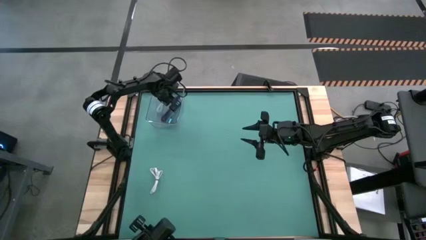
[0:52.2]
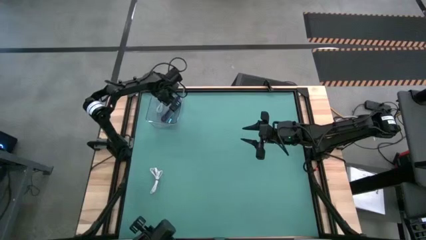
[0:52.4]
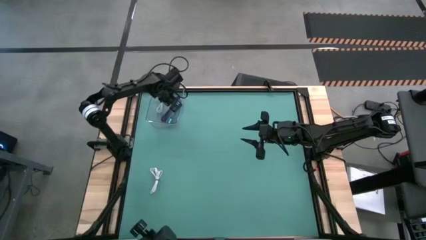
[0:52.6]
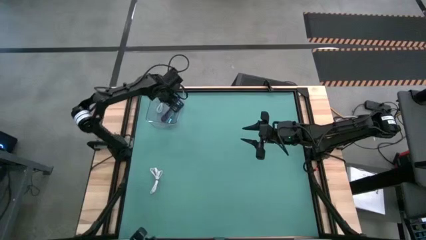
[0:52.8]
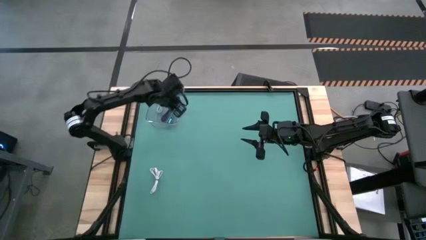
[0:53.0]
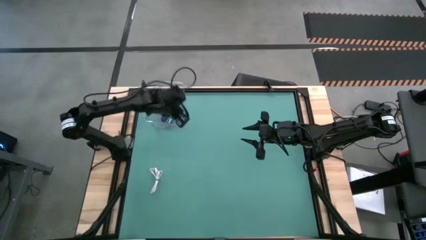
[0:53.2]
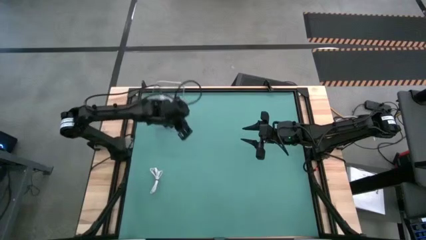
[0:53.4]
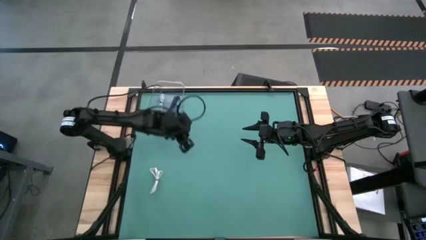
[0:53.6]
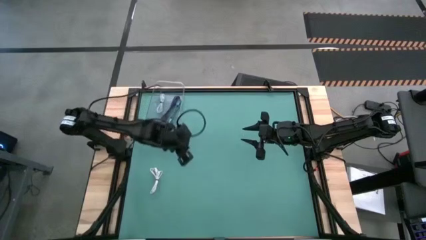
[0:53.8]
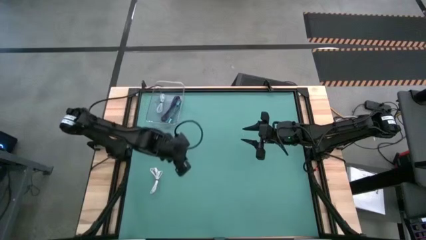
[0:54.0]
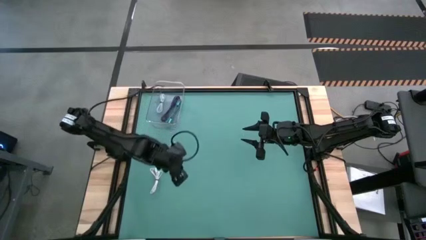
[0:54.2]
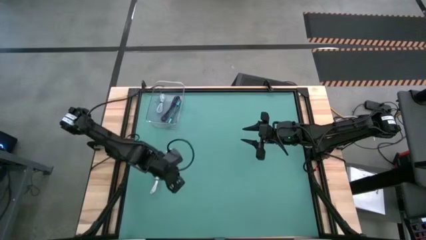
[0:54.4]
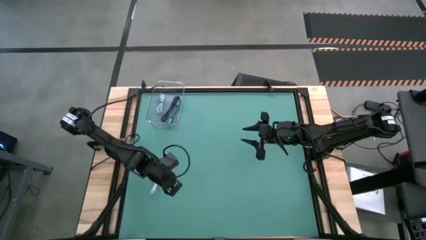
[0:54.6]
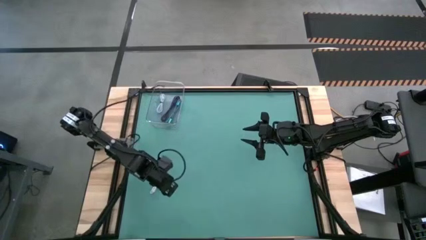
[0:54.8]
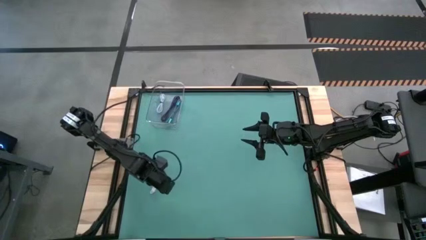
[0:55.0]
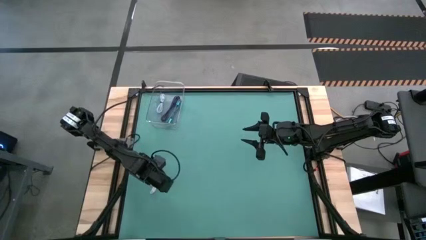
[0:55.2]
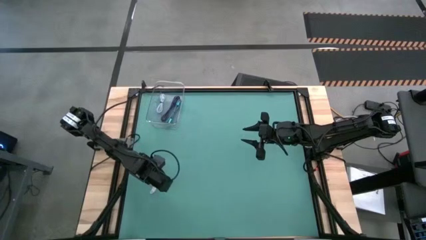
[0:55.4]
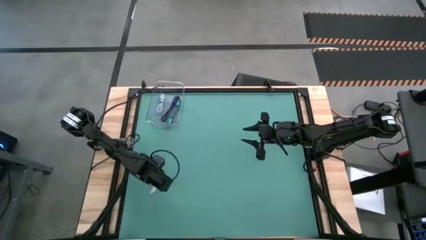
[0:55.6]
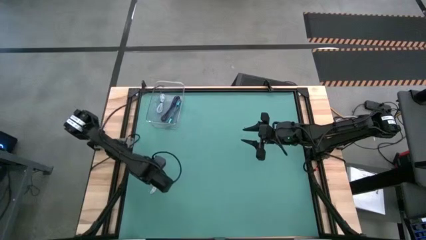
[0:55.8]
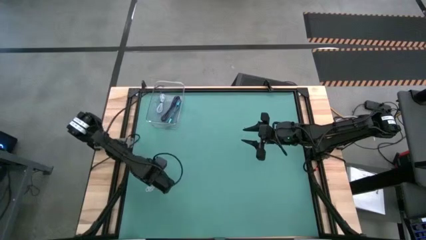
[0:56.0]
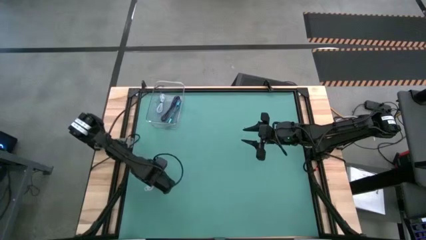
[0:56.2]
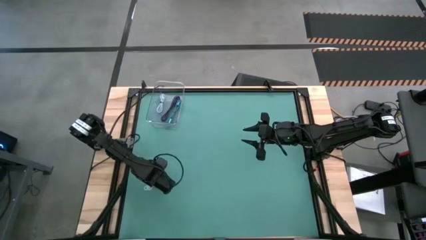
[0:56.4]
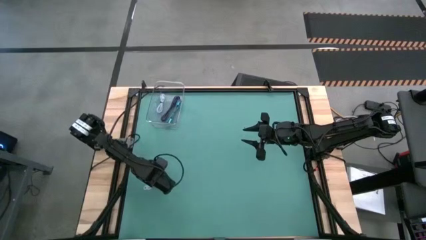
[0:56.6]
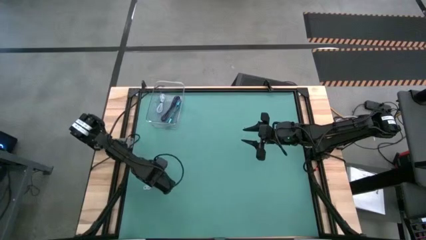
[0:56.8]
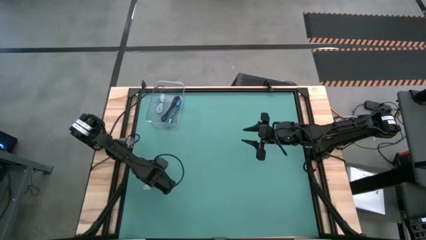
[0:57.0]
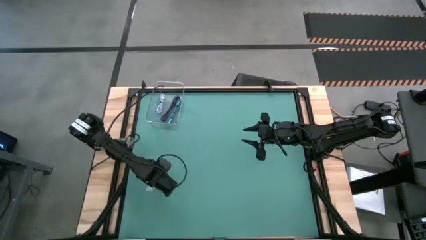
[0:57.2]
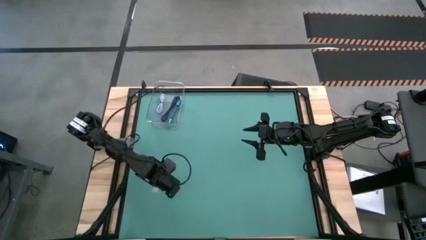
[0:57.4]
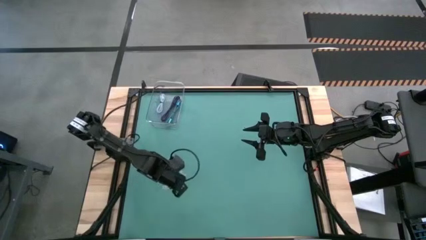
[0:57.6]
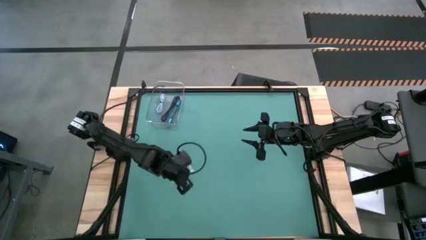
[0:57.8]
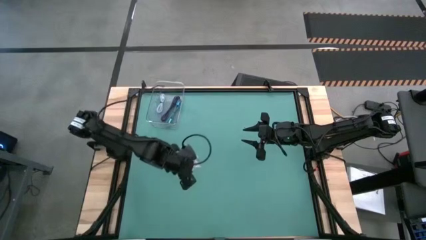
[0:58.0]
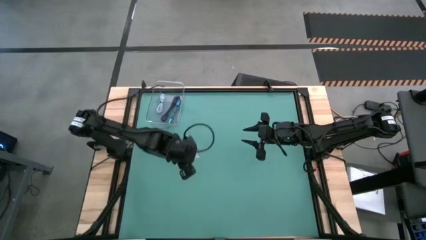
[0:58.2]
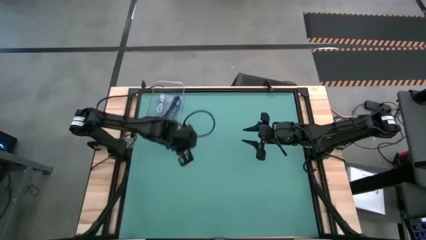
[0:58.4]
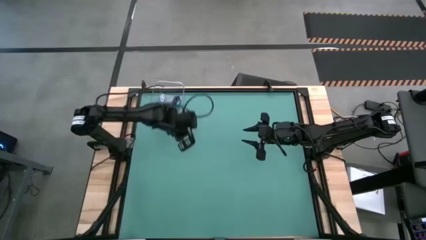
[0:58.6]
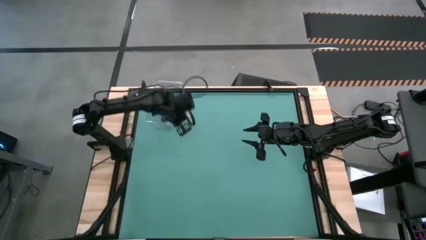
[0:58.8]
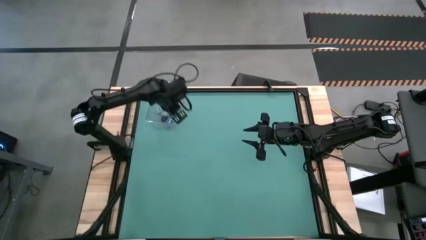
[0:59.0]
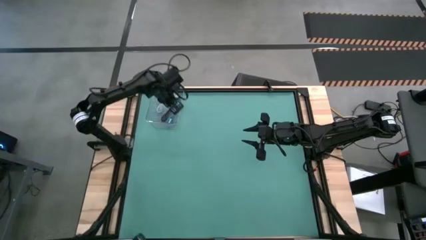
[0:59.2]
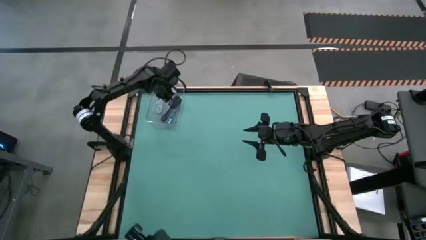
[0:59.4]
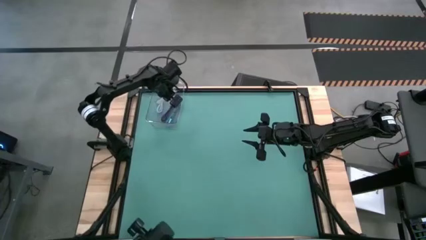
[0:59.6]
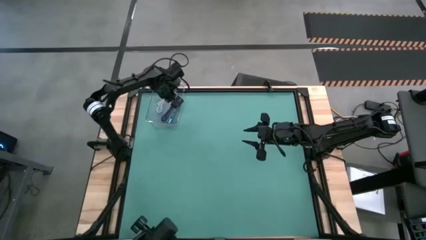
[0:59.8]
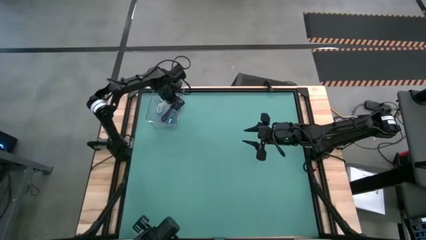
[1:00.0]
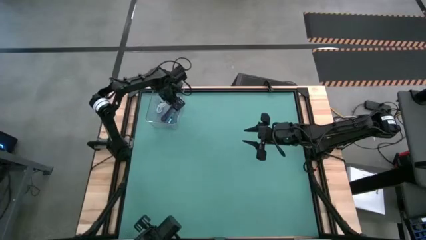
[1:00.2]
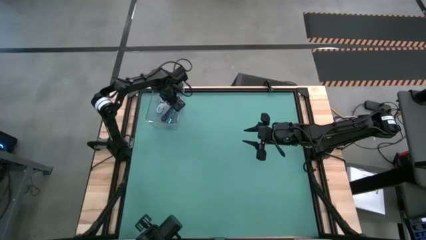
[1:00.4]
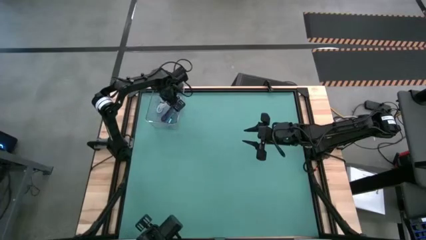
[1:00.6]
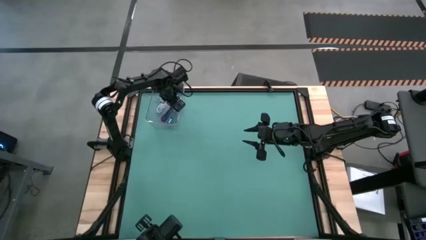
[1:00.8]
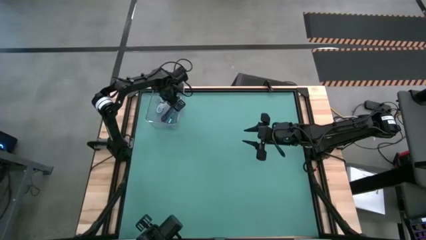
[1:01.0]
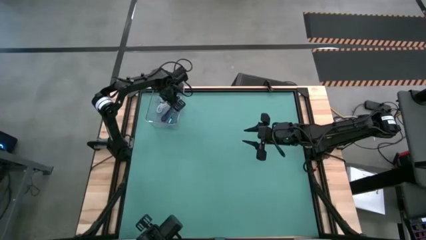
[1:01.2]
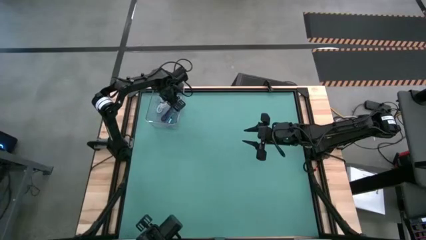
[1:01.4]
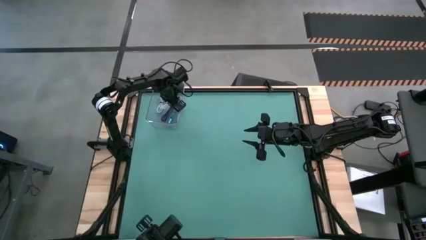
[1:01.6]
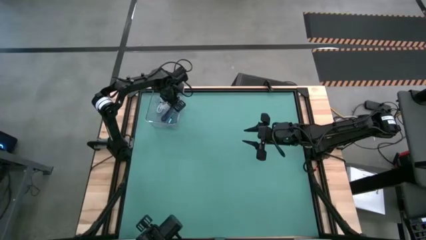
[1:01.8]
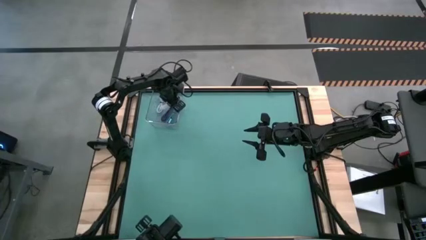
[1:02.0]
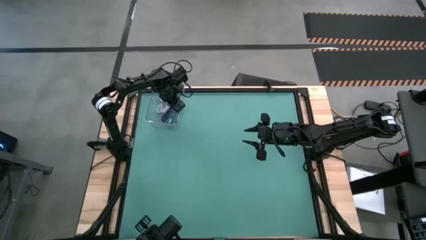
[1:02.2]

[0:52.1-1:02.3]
Task: Pick and place USB-C Cables
Put the white charger cable into the transparent bin

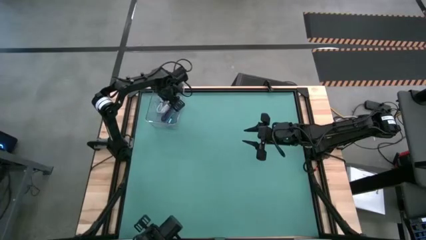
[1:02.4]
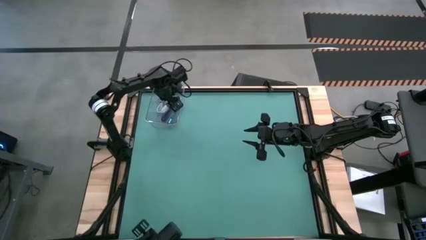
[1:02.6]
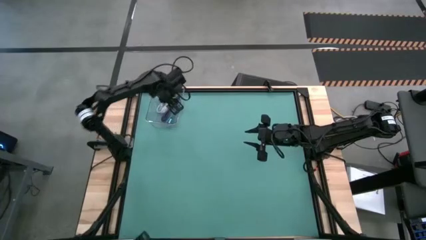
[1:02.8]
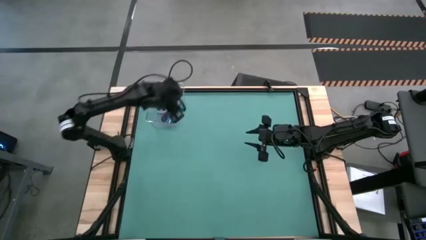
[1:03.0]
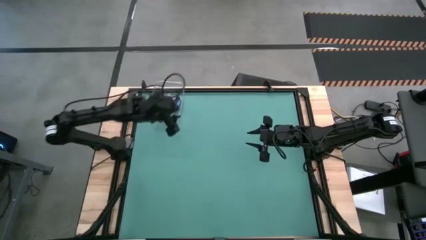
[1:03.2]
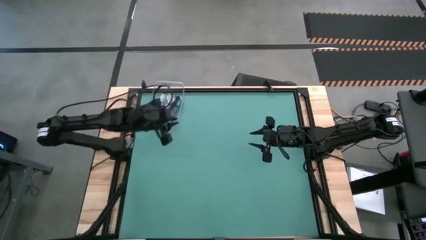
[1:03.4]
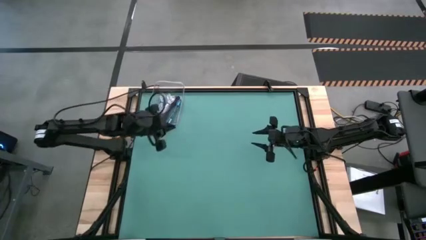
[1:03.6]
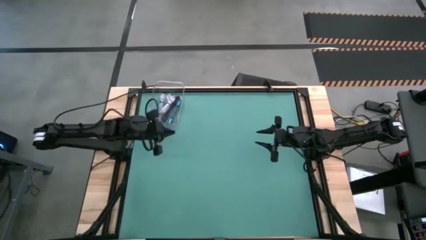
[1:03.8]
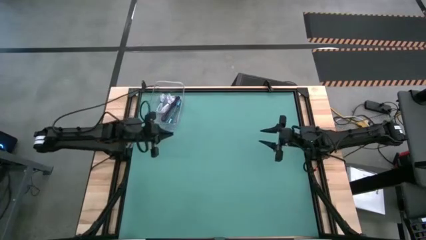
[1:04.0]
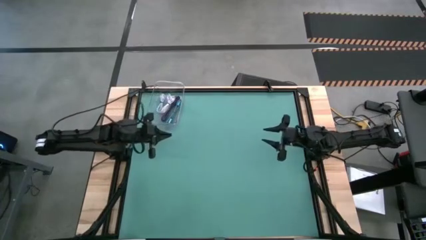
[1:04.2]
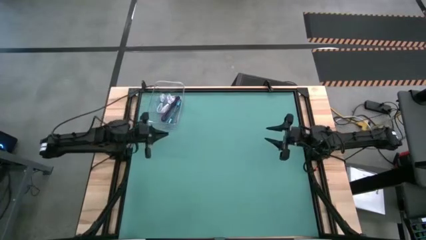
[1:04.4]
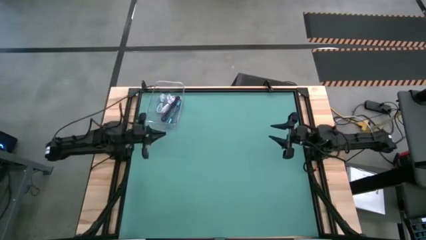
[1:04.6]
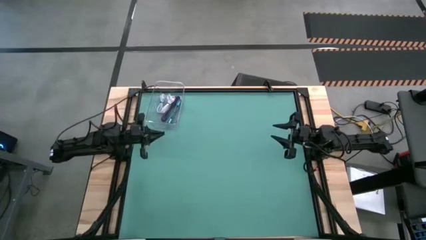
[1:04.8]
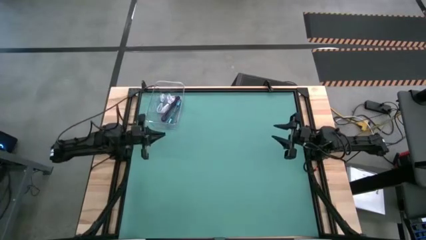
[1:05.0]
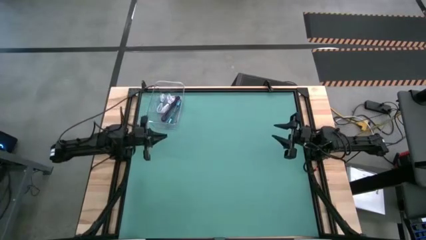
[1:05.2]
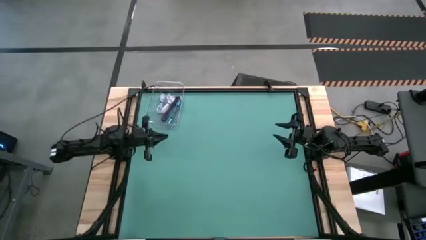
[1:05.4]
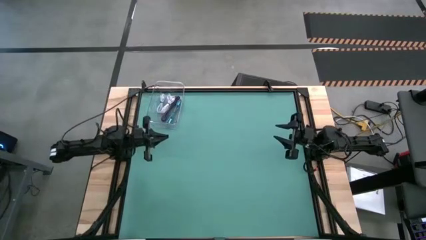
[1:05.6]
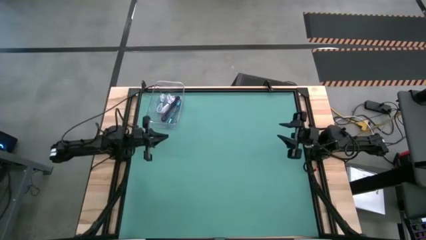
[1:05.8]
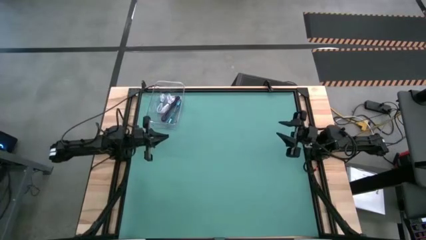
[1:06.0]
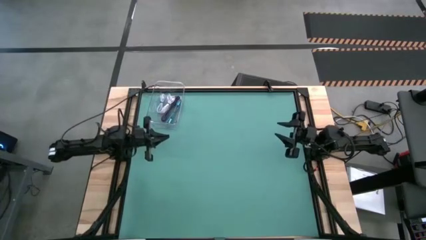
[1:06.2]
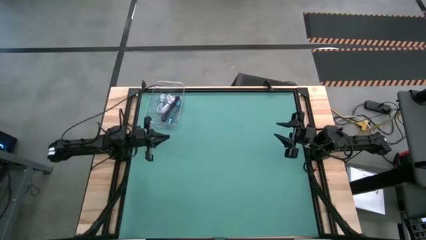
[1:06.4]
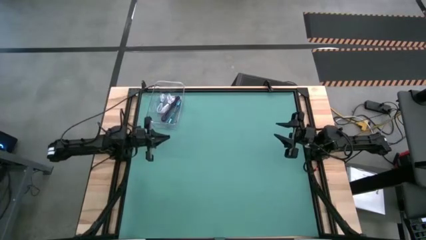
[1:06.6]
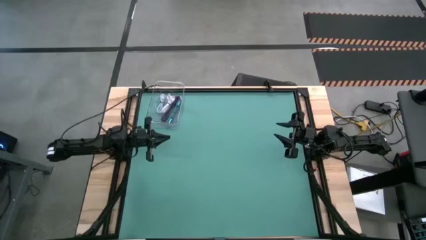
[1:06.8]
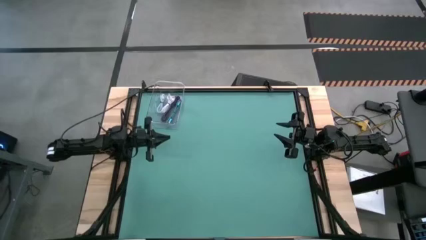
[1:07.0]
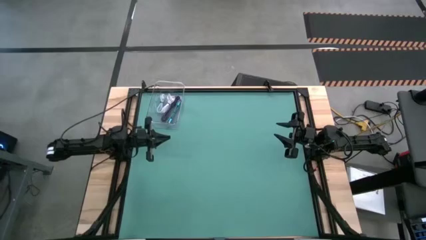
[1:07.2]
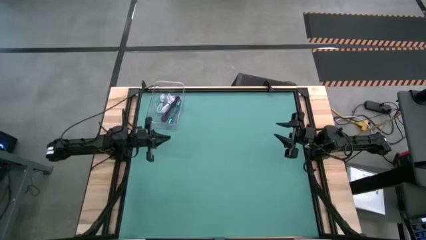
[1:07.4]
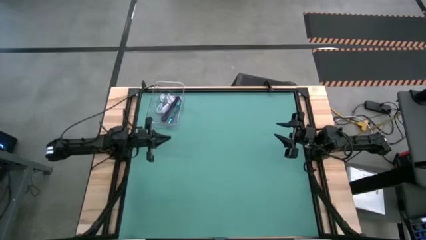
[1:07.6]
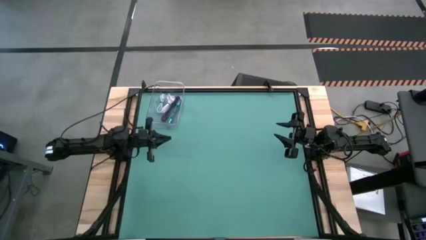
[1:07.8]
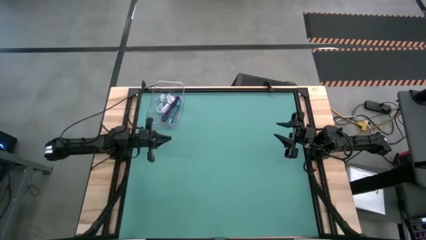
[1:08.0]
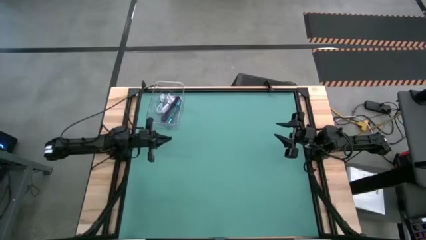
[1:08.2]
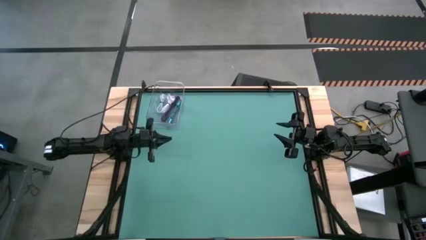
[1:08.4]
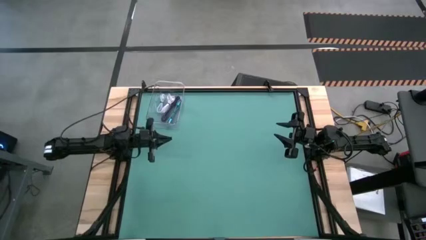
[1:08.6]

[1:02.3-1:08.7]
Return to Home Position
